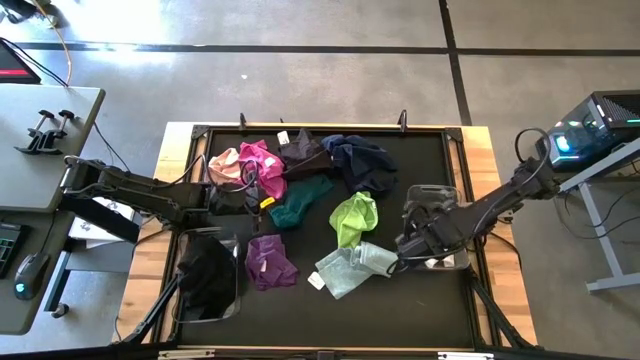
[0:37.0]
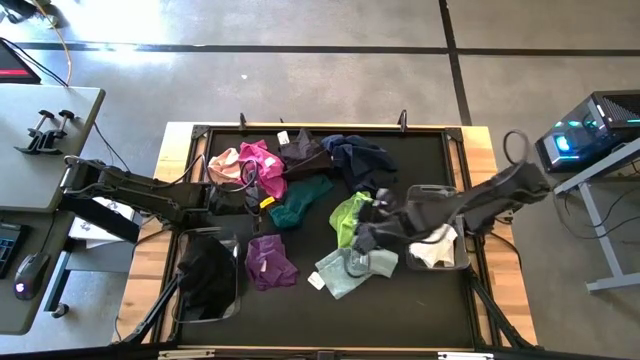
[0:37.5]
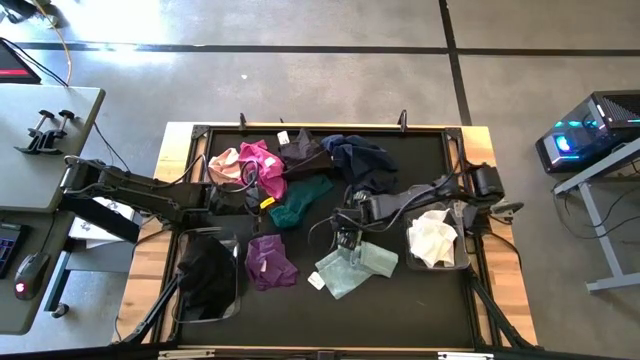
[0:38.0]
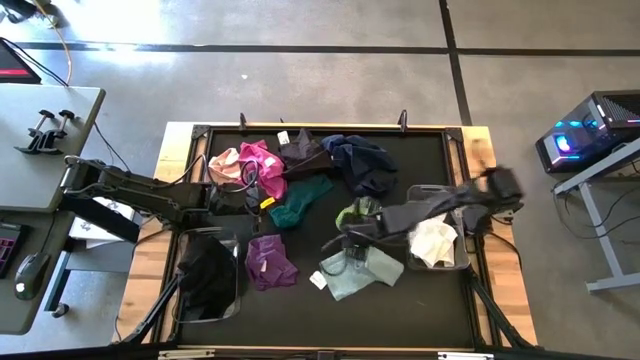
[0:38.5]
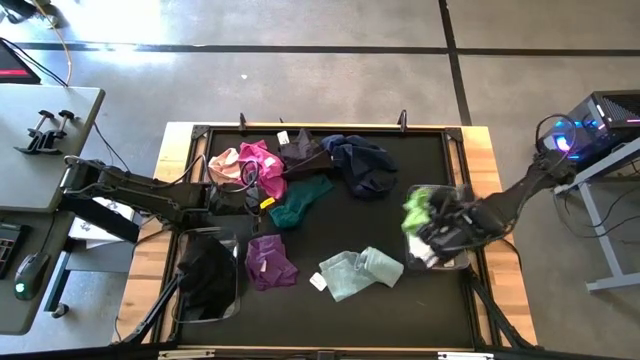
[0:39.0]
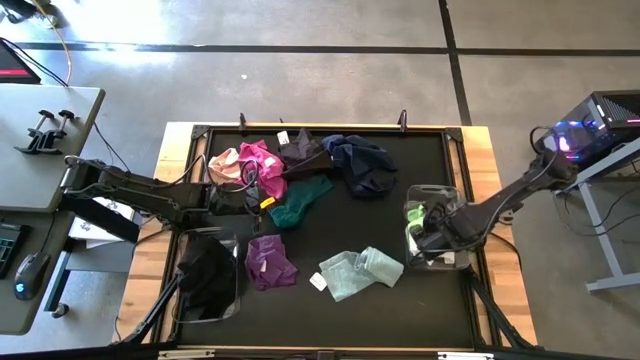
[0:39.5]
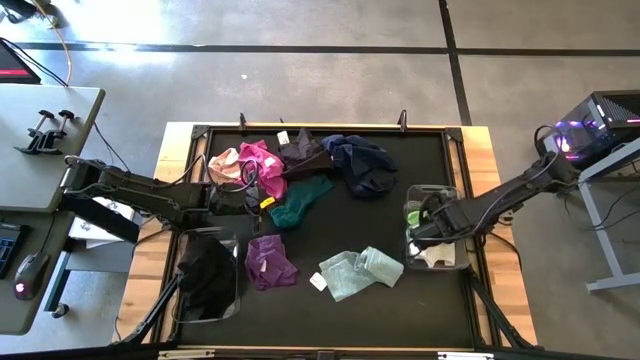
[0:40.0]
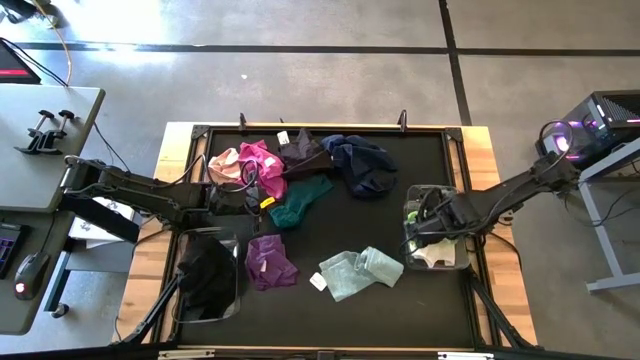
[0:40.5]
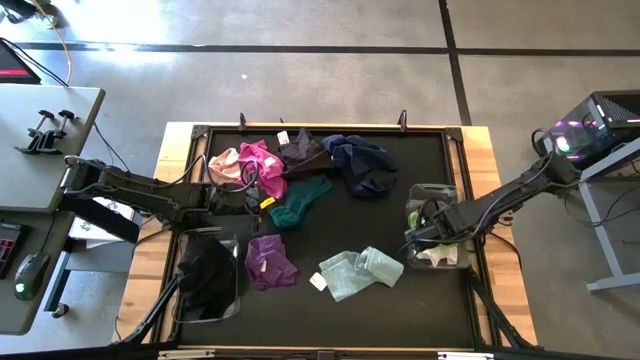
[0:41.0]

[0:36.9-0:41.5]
Task: Sort towels by color in basket
Put the light green towel into the right transparent bin

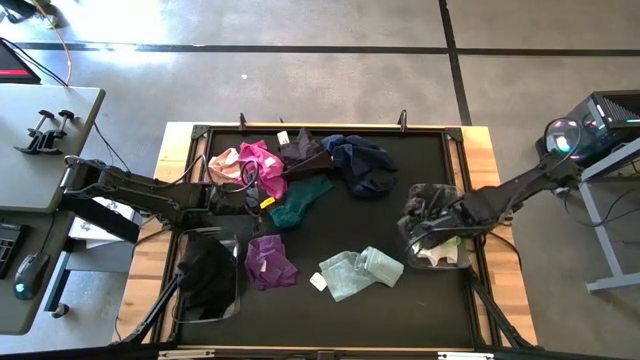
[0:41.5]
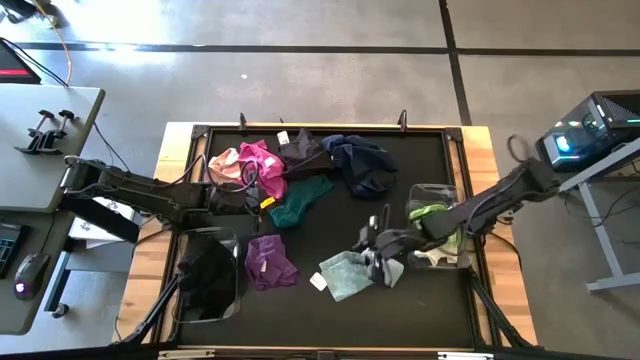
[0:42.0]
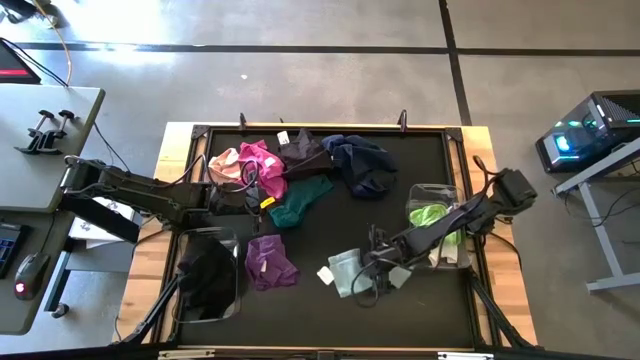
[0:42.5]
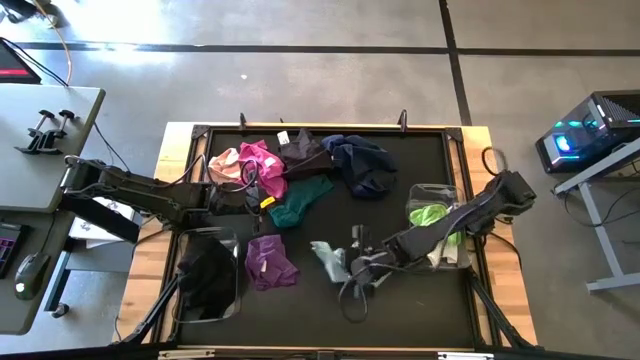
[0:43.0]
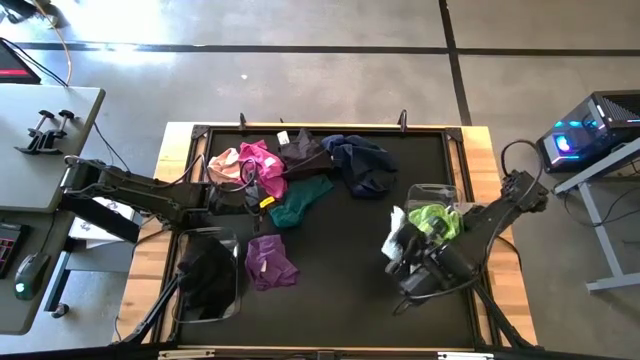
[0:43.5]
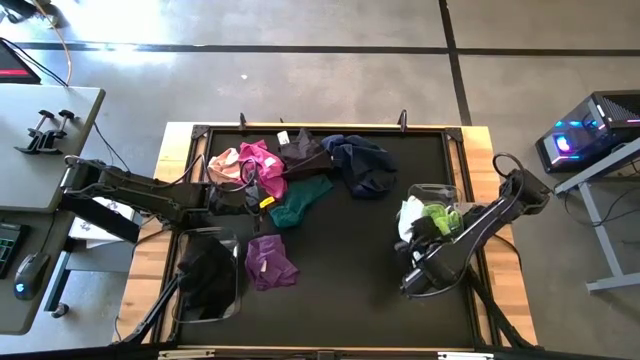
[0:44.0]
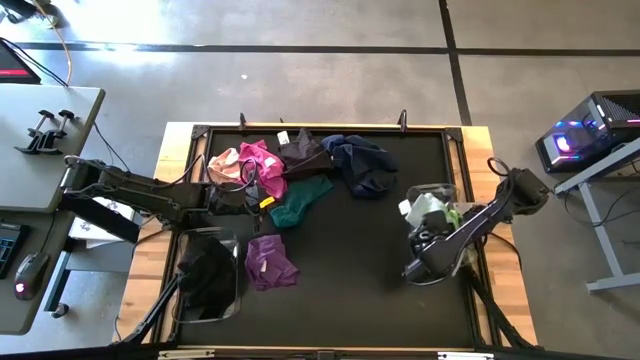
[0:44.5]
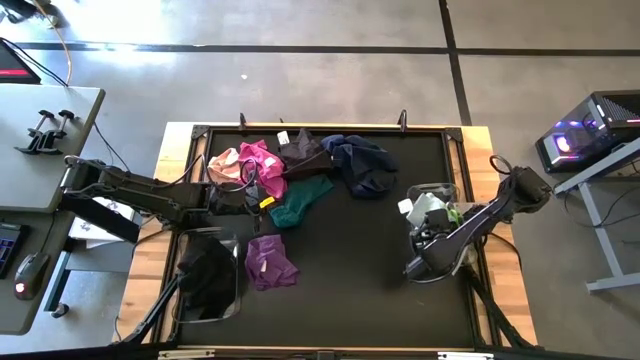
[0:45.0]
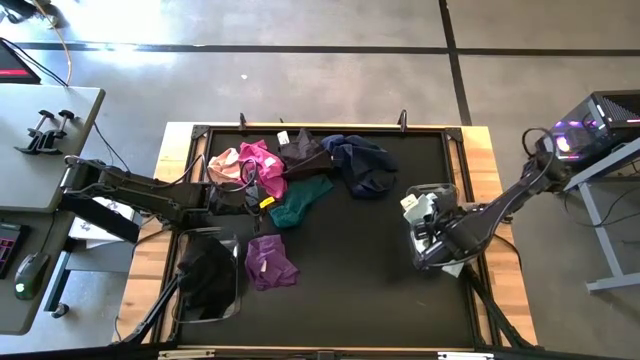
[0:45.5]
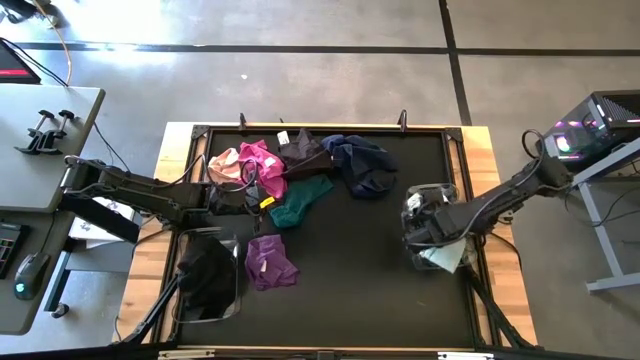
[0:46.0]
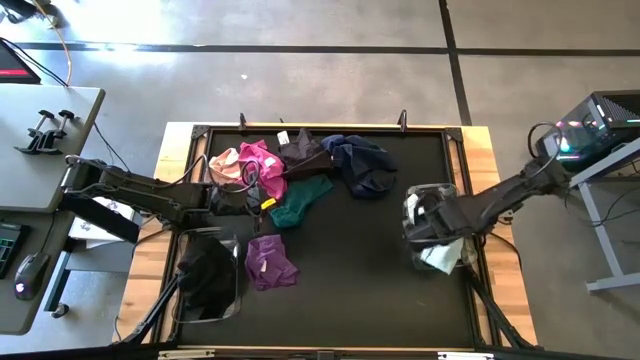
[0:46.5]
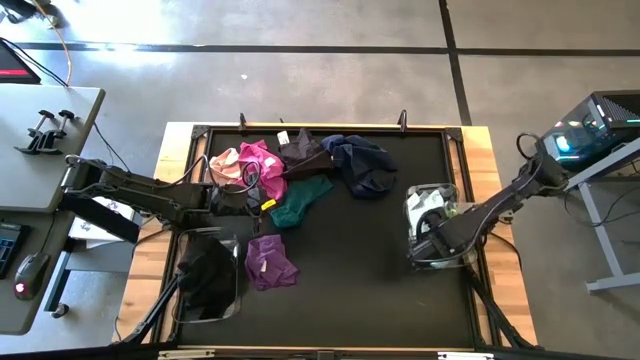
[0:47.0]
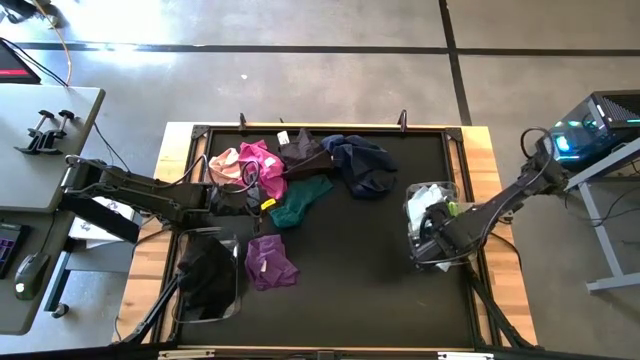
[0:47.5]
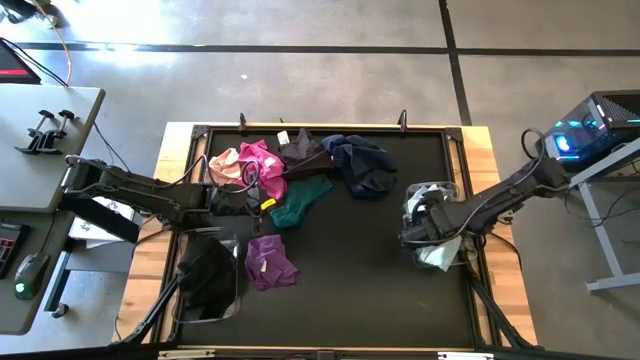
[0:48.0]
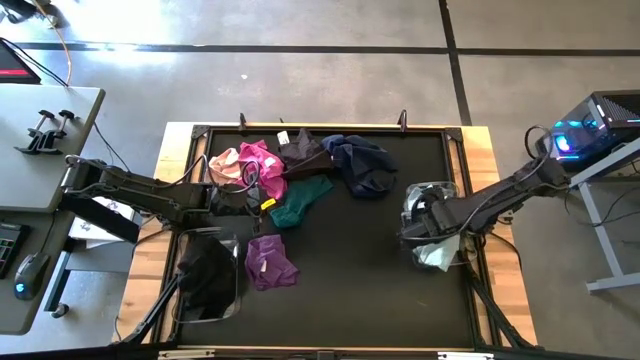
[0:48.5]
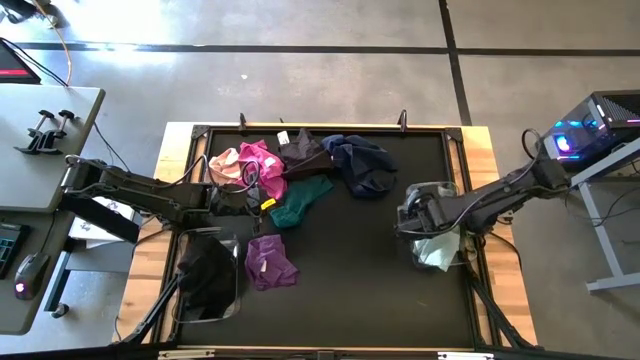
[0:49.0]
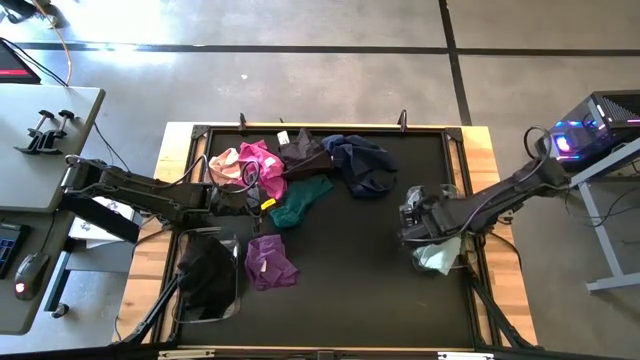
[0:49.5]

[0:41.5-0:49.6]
Put the light blue towel into the right transparent bin

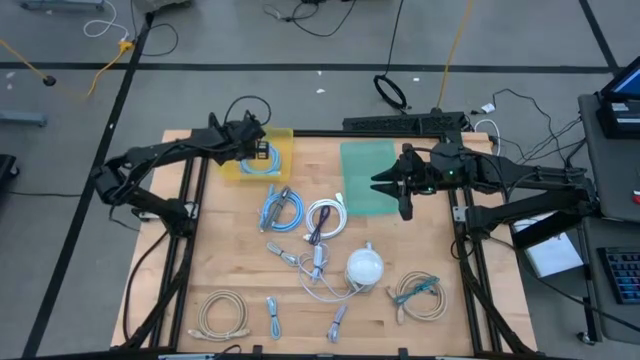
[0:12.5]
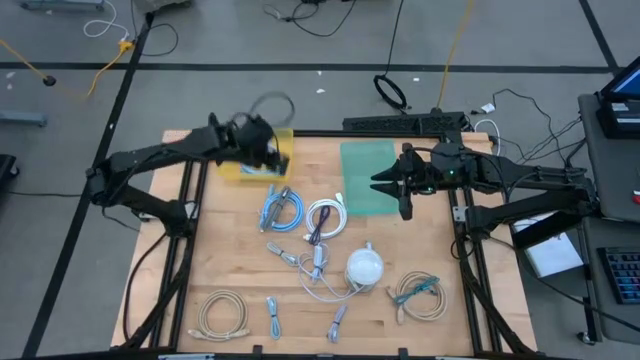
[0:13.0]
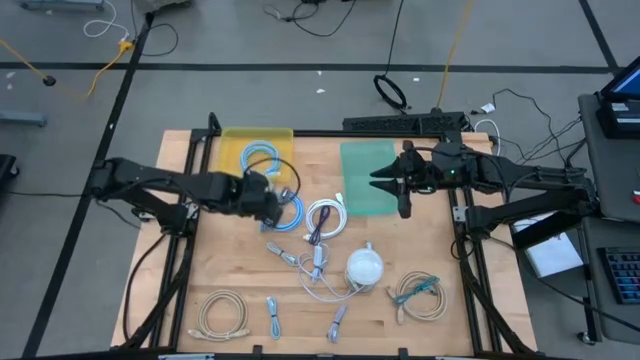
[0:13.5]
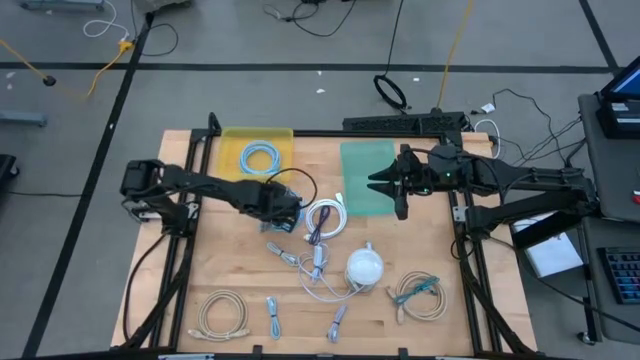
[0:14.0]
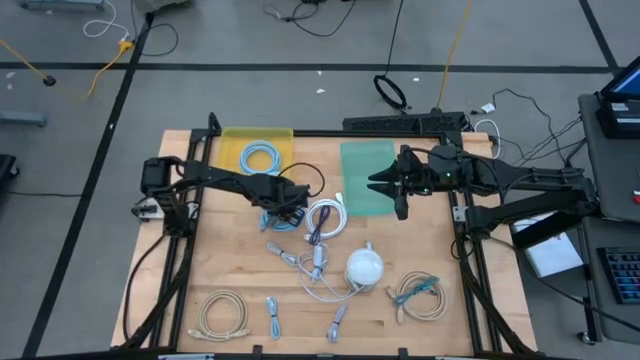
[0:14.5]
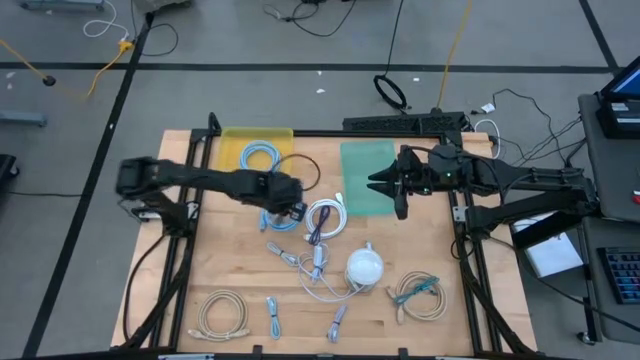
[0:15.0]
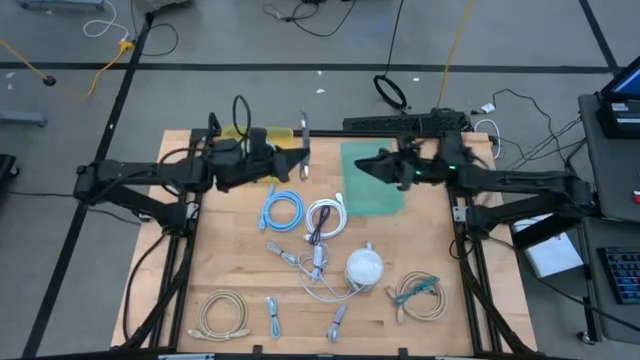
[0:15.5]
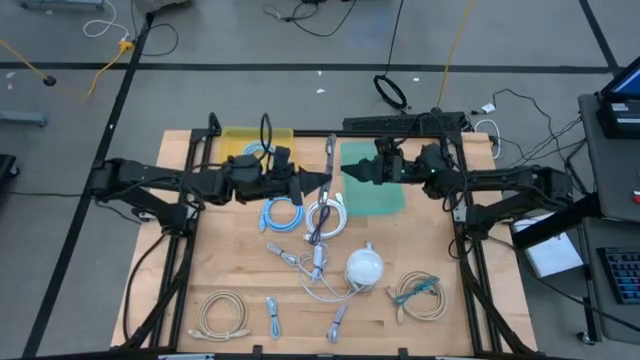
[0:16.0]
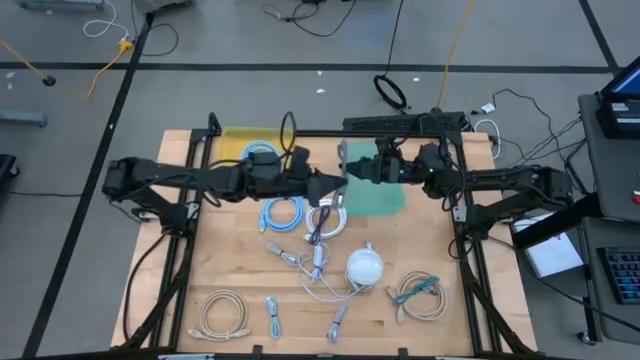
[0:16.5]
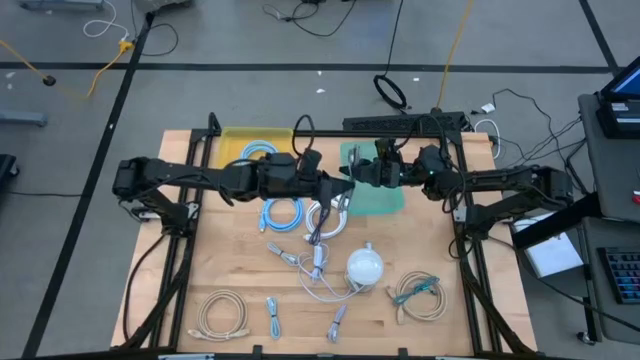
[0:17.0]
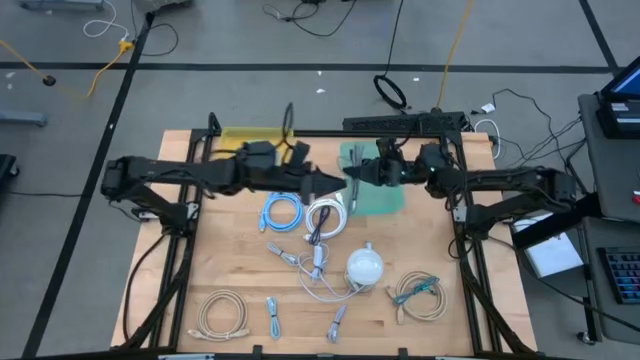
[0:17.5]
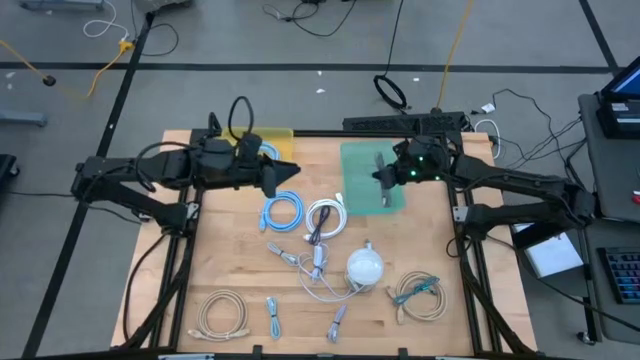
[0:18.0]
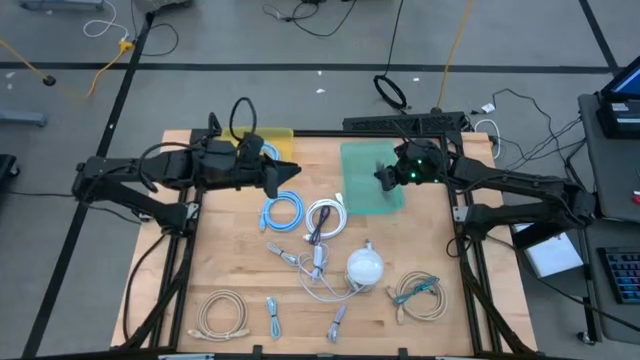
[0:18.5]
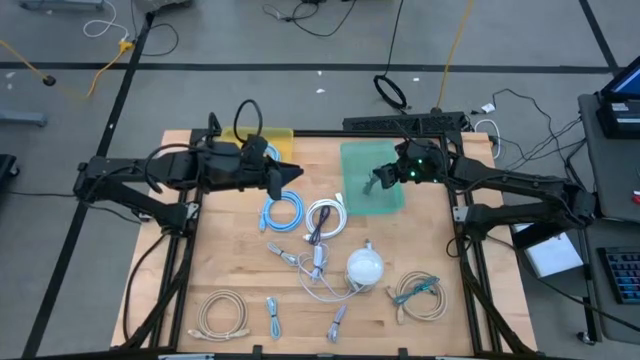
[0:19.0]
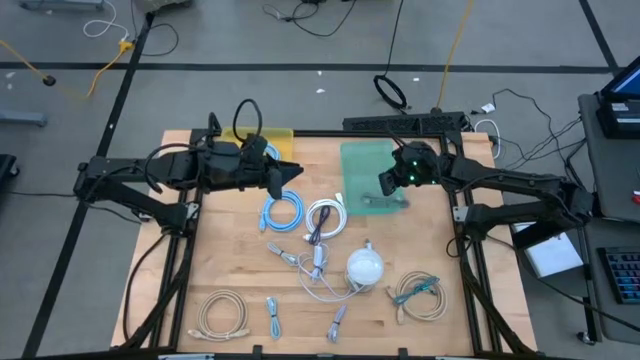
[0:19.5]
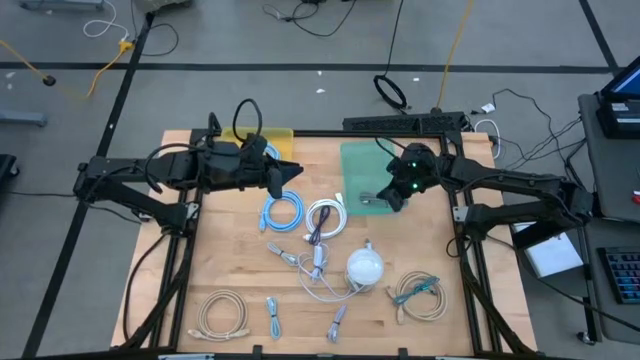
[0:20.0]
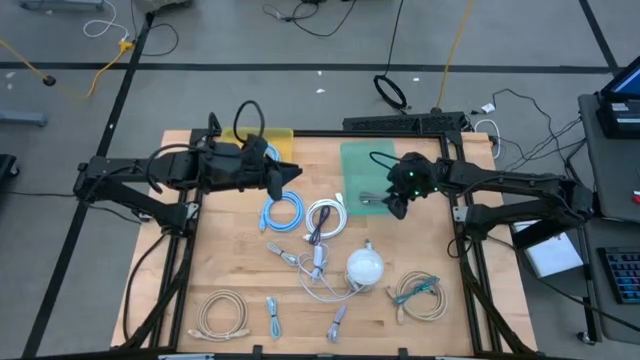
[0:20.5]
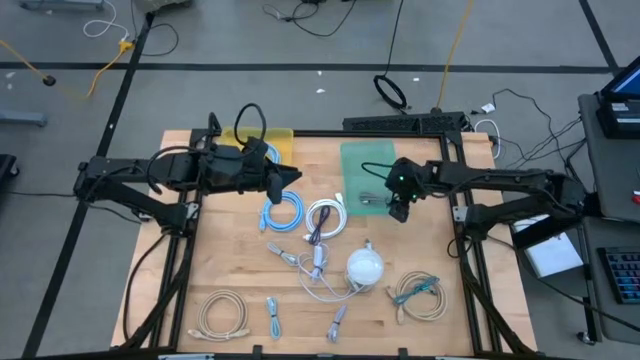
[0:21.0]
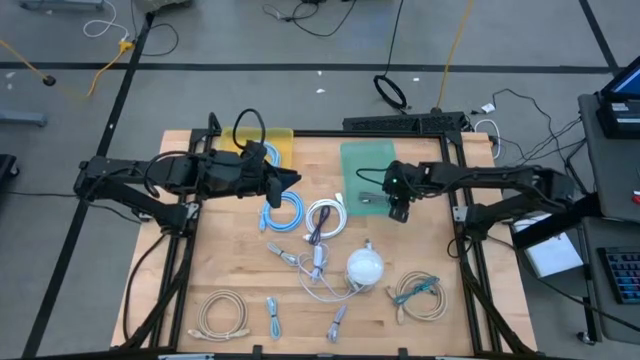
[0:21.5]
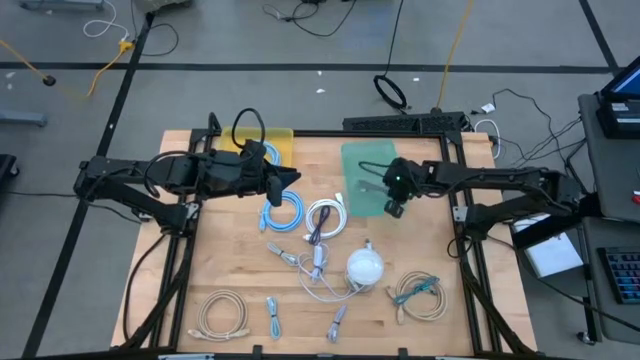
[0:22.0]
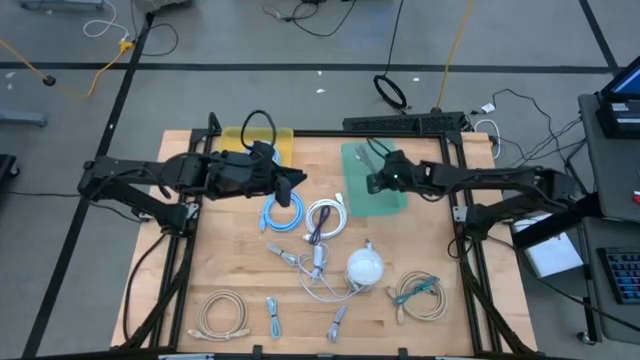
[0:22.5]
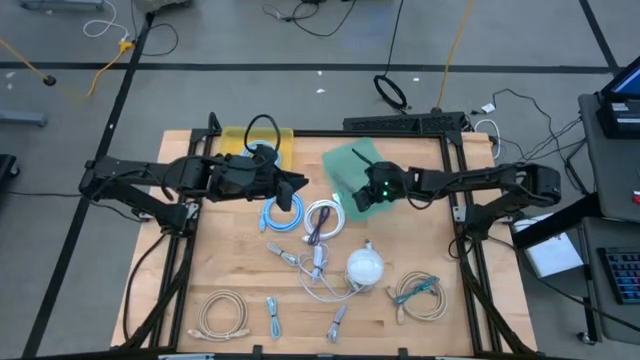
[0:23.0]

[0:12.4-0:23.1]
Task: Pick & Place USB Port
Put the white and black charger cable into the green bin
